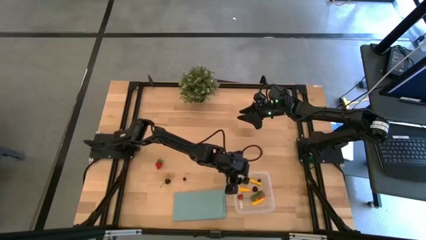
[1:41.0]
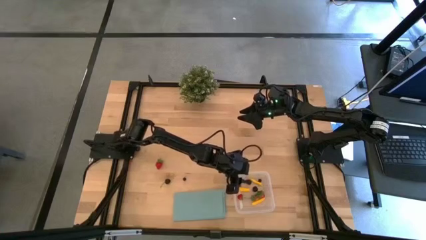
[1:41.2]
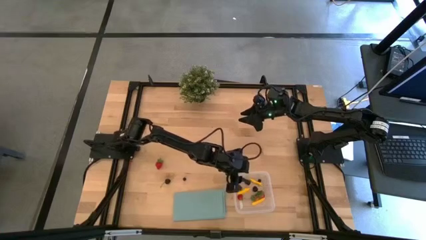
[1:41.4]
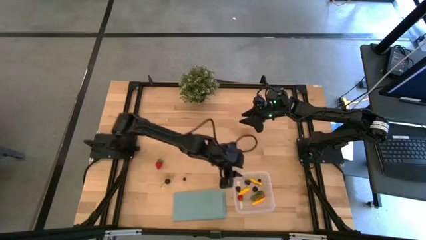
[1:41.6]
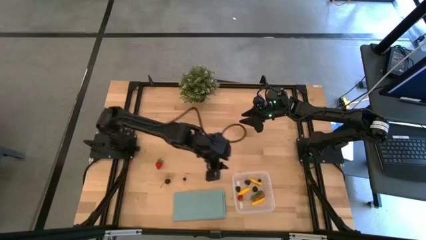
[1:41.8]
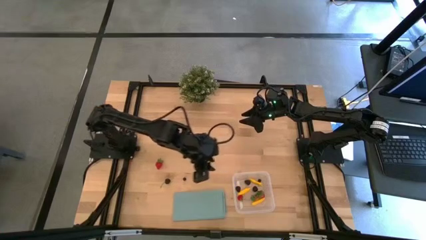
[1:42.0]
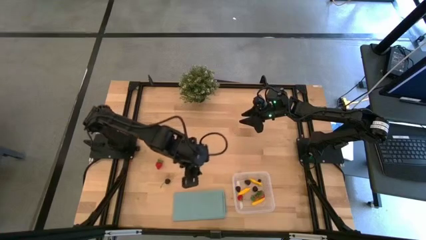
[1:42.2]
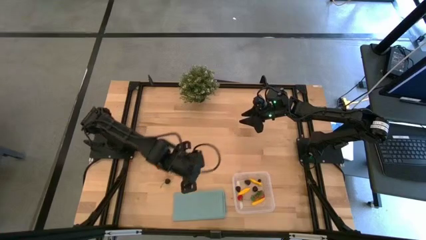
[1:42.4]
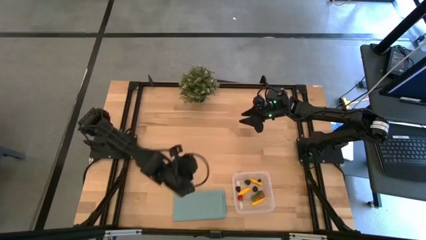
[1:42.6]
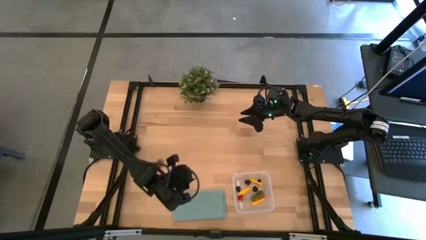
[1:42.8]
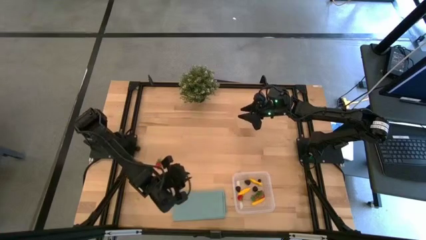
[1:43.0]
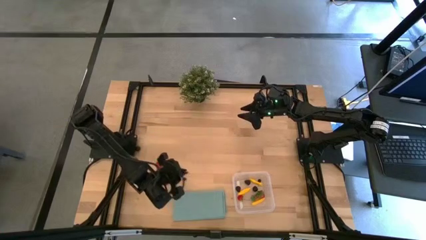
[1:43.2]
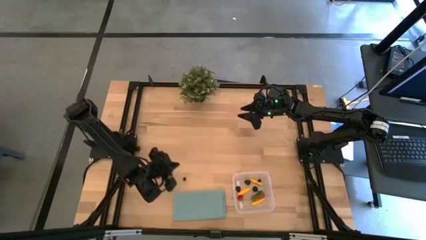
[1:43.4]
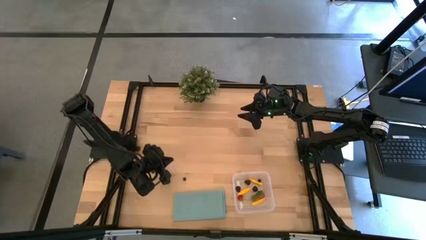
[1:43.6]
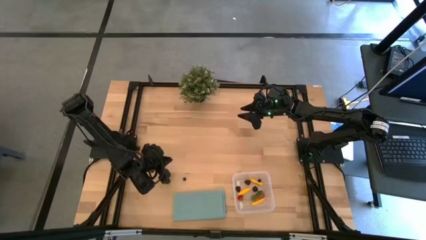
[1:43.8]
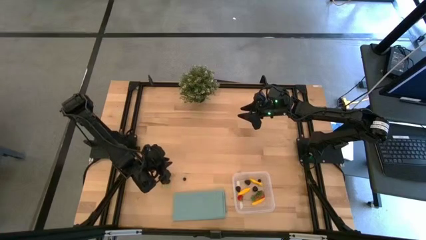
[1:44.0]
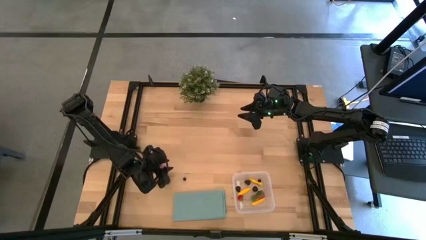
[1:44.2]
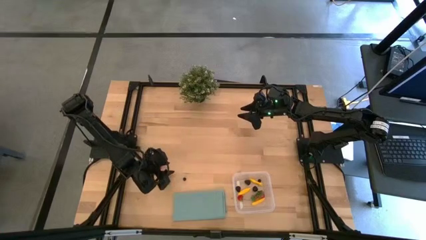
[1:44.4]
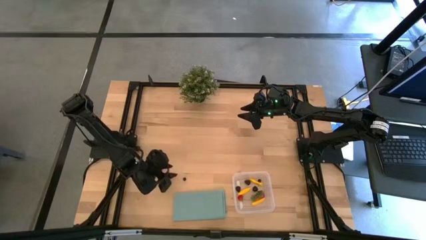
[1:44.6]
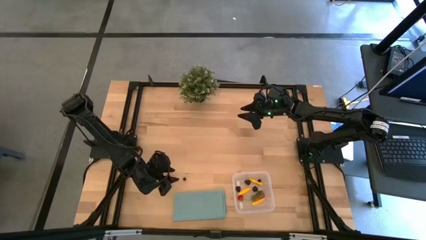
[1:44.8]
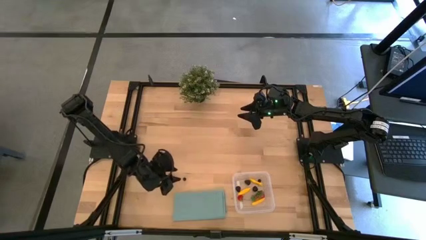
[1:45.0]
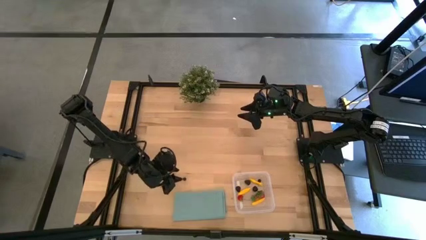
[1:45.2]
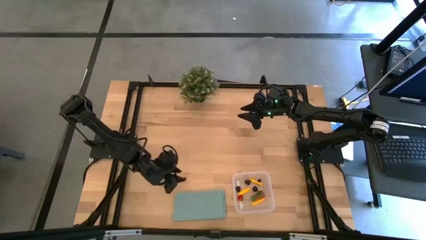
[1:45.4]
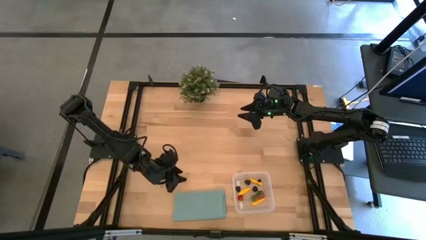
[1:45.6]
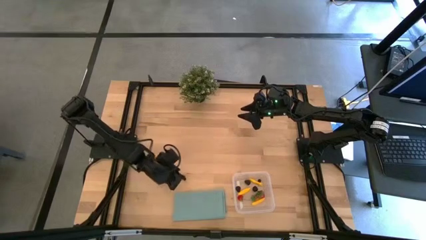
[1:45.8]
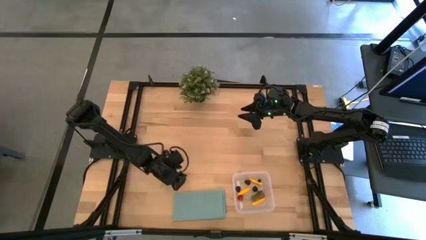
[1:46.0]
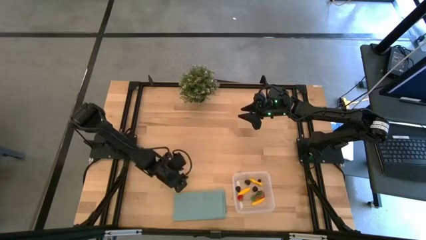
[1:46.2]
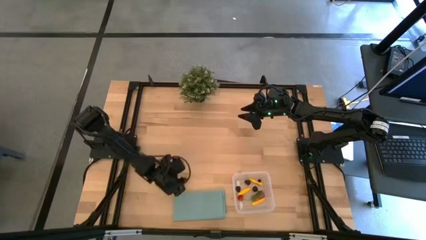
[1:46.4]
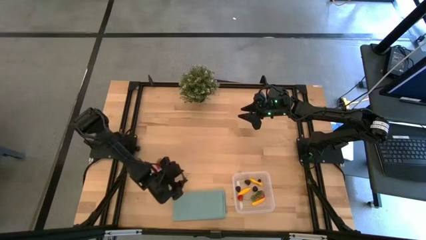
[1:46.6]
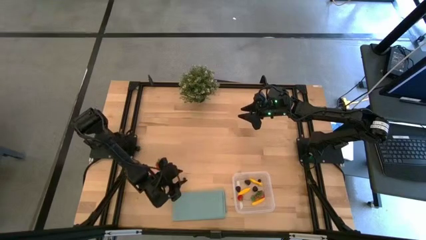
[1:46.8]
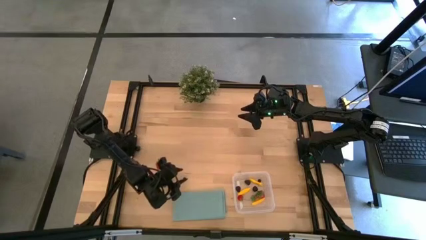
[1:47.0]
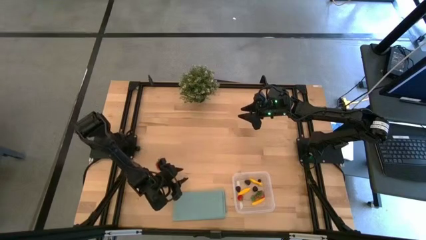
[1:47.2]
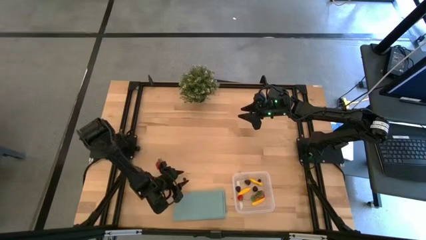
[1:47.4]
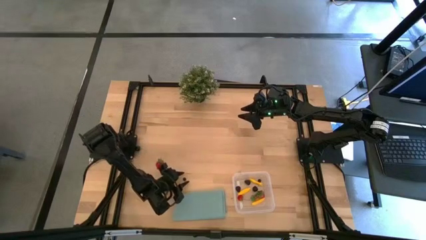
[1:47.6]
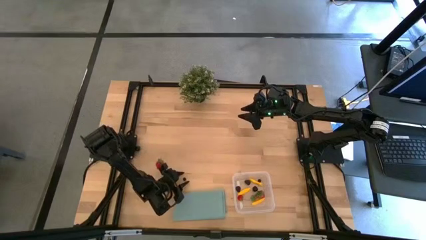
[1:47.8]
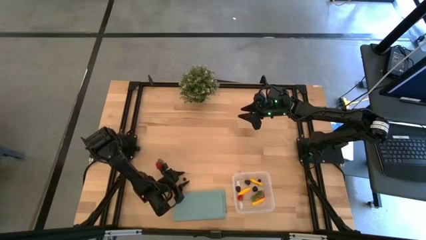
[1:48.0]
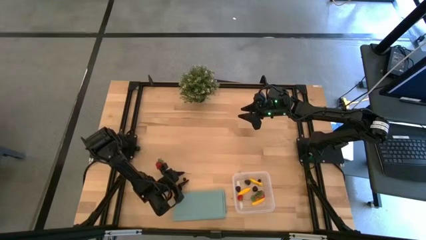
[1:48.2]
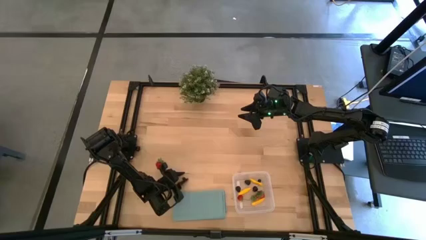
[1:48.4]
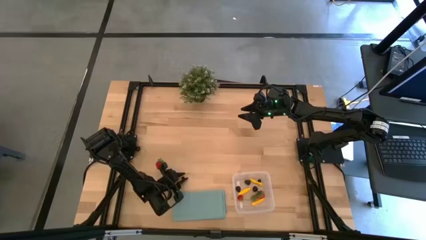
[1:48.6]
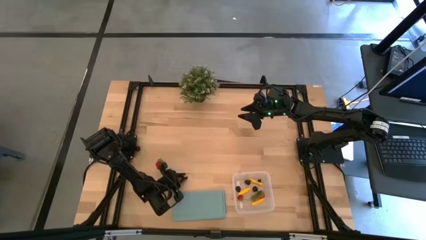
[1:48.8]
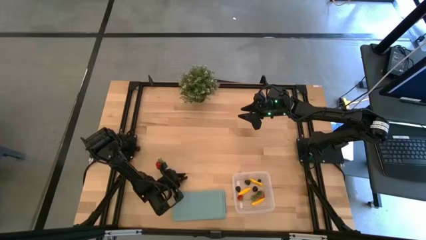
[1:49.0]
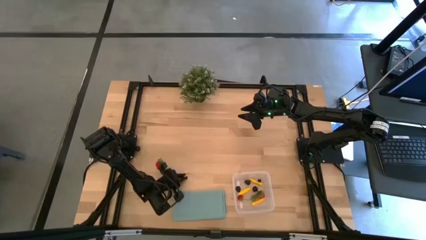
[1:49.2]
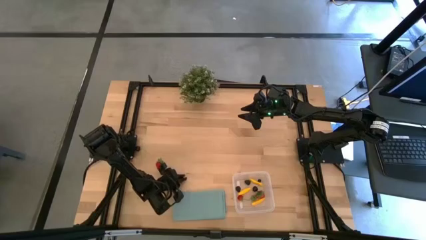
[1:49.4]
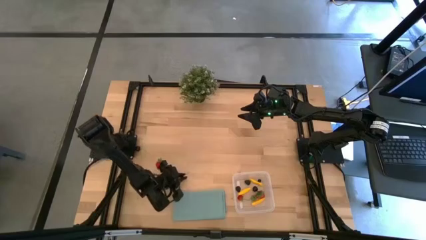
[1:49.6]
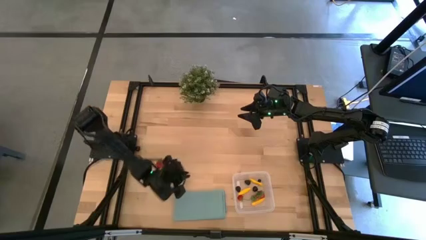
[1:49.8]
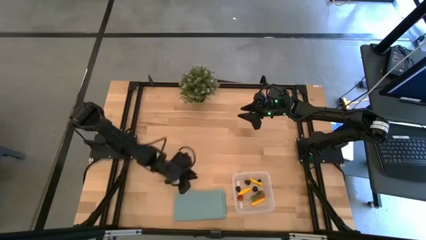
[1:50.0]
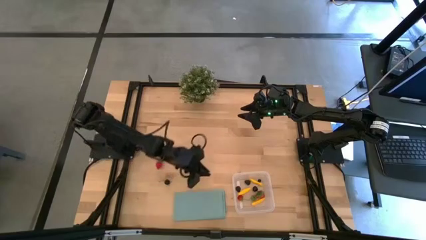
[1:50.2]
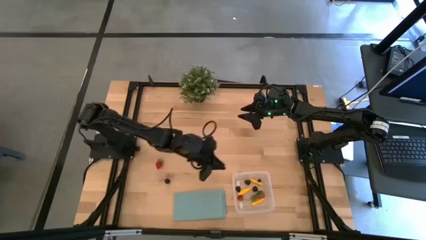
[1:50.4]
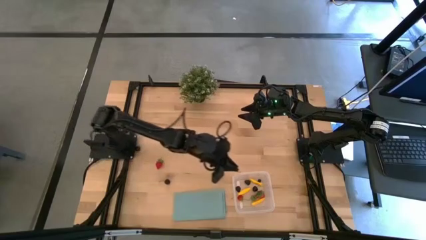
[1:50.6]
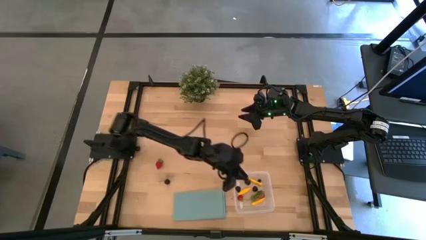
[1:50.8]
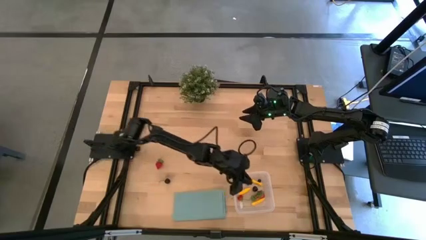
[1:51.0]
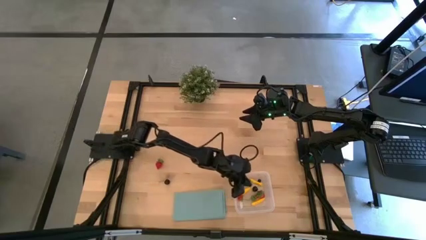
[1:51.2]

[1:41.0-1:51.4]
Task: Pick and placing Produce into tupperware
Put the blueberry into the transparent bin

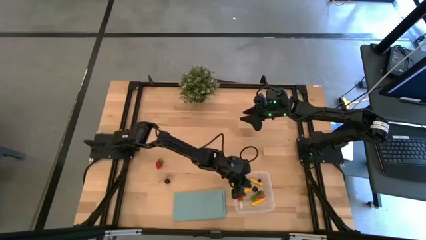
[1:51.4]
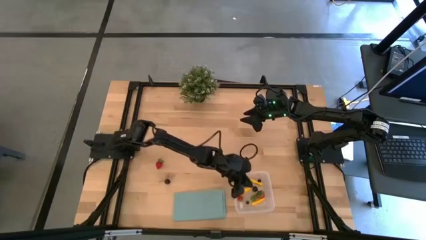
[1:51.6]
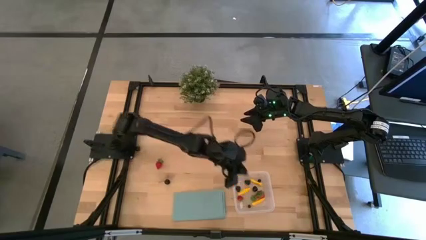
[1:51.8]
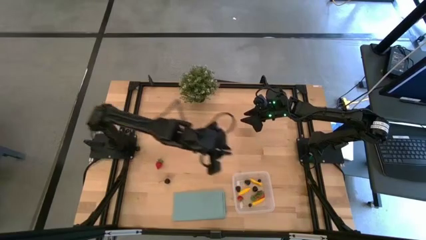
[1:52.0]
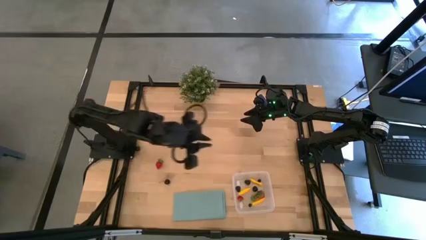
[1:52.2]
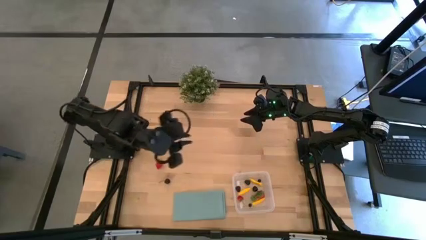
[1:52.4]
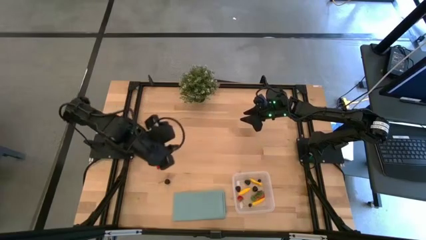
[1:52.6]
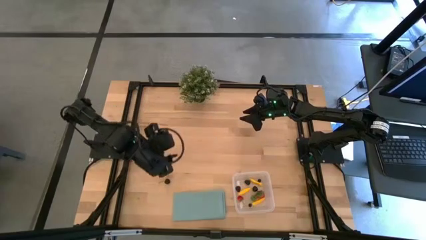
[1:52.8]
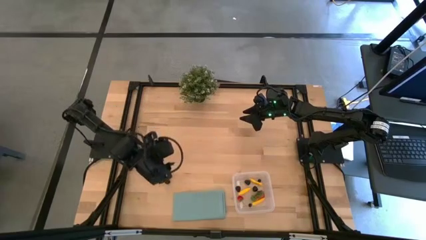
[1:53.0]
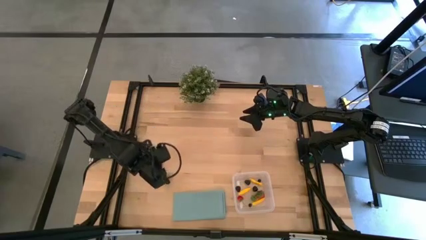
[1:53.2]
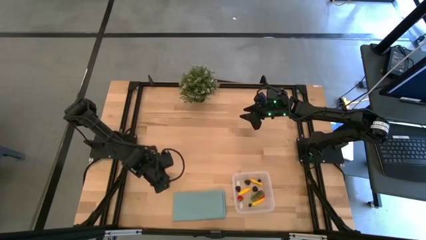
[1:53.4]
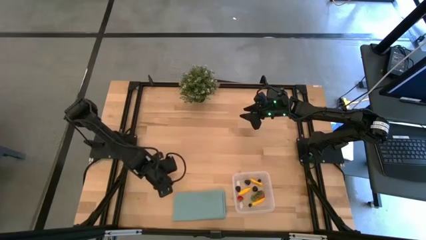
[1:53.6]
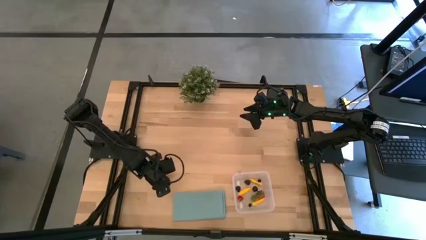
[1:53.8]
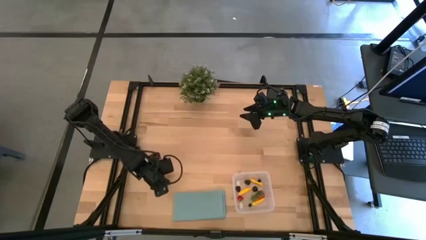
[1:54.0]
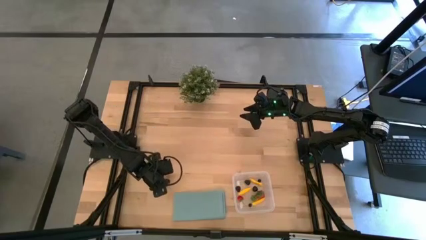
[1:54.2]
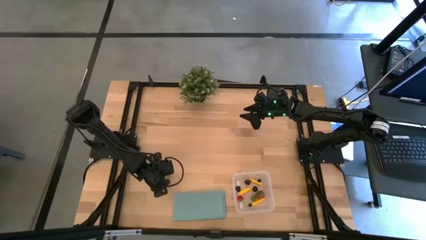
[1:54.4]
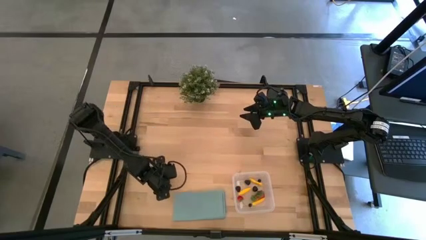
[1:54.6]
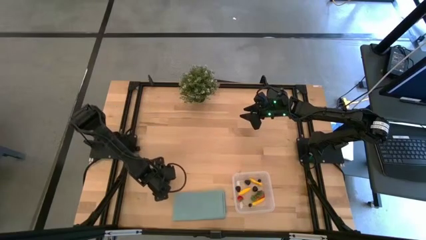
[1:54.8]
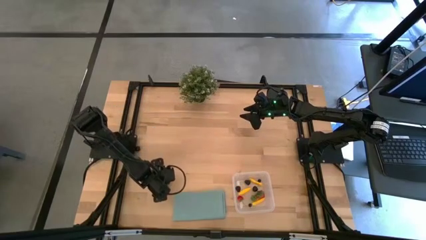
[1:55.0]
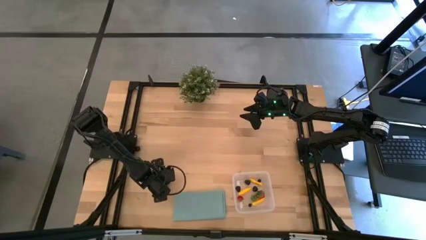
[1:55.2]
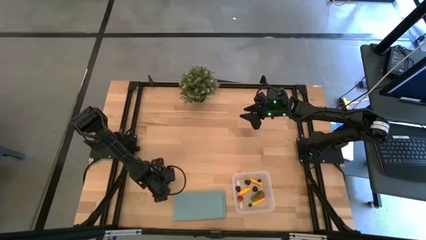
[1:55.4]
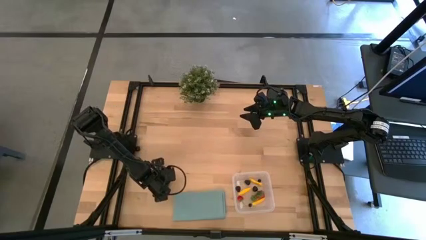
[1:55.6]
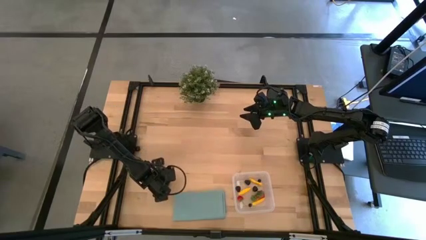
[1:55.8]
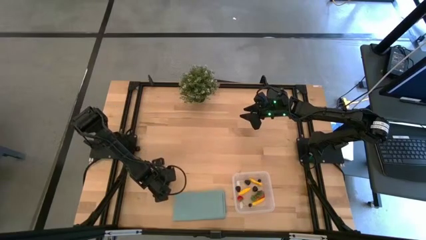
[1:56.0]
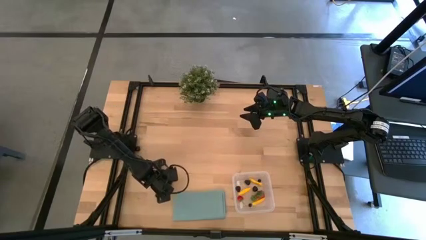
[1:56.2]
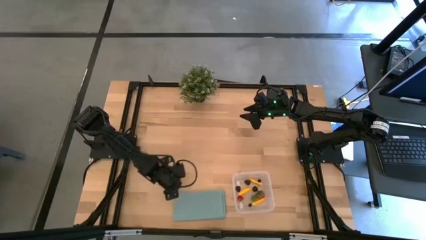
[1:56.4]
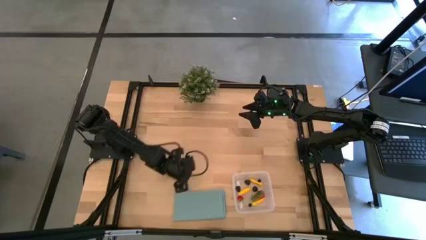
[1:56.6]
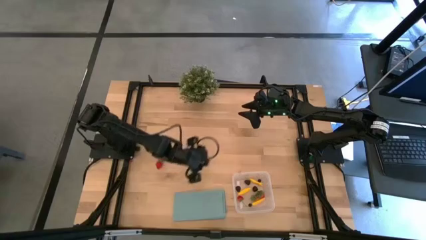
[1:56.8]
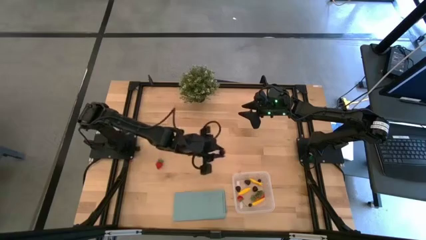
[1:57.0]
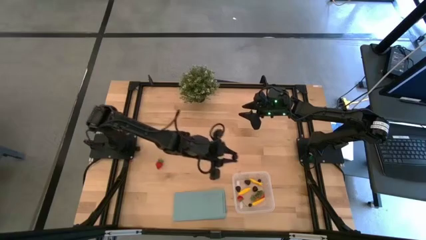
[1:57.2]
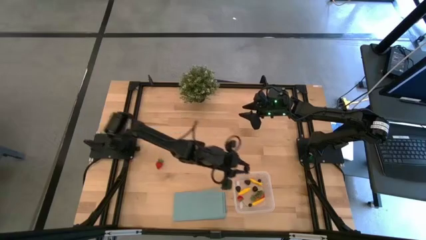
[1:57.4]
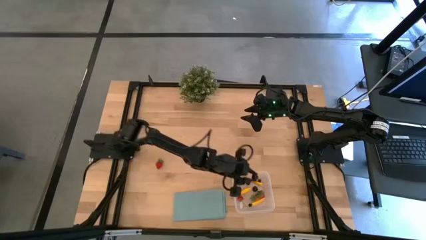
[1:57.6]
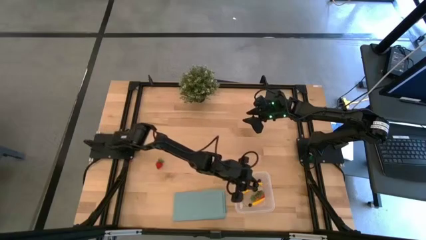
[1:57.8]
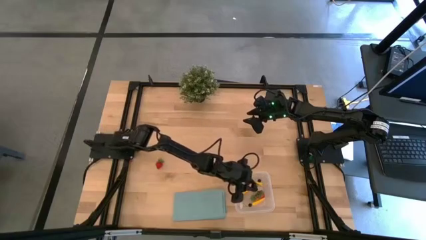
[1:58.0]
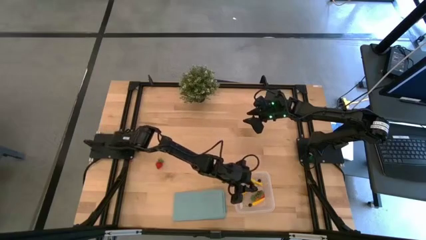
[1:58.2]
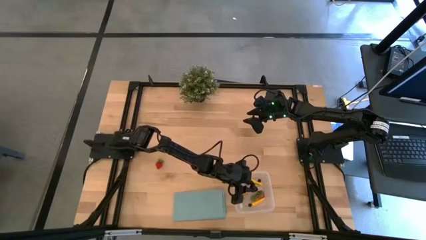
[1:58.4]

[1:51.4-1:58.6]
Put the black cherry into the transparent bin
